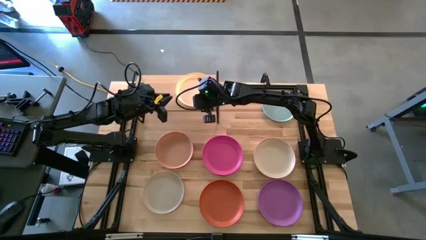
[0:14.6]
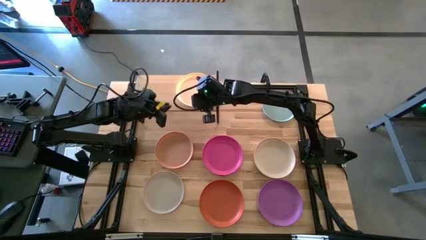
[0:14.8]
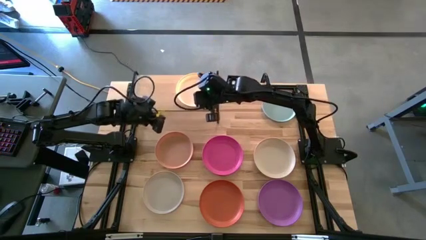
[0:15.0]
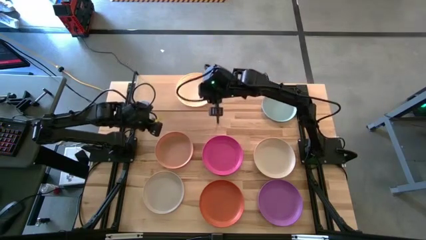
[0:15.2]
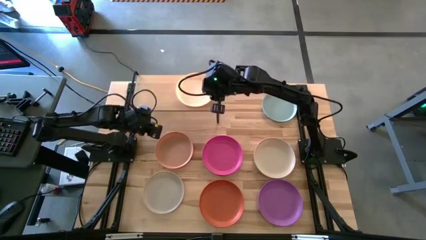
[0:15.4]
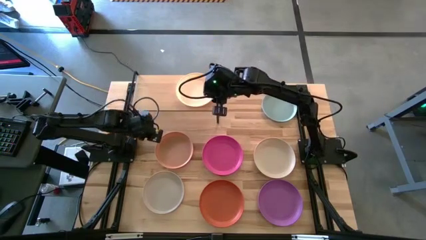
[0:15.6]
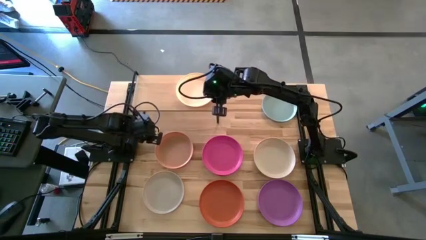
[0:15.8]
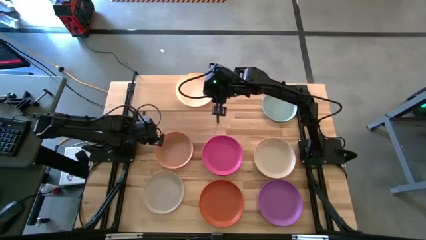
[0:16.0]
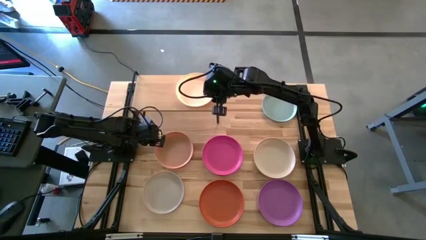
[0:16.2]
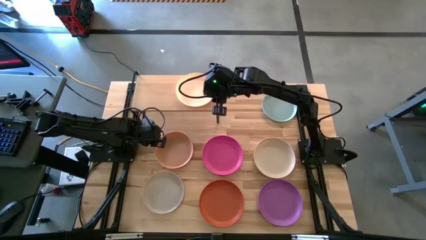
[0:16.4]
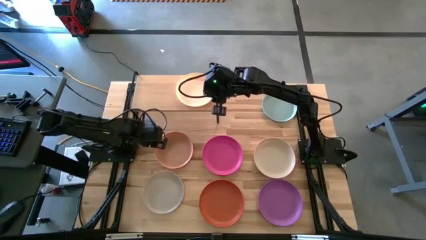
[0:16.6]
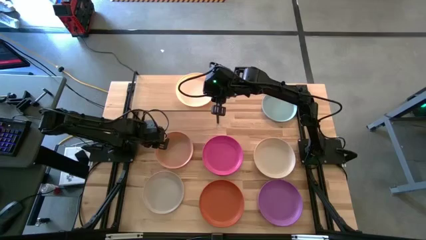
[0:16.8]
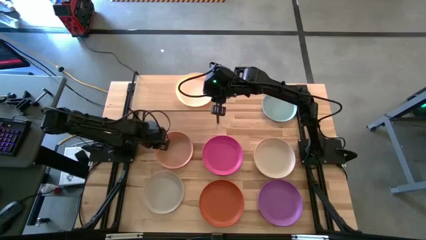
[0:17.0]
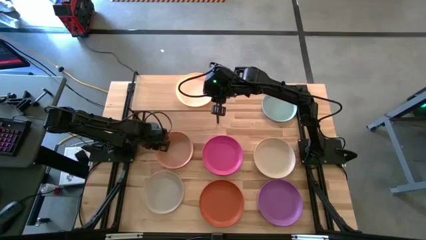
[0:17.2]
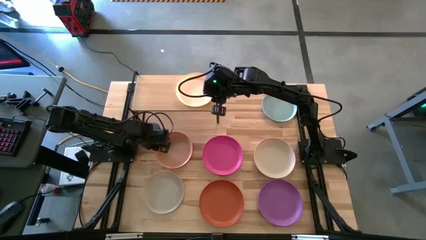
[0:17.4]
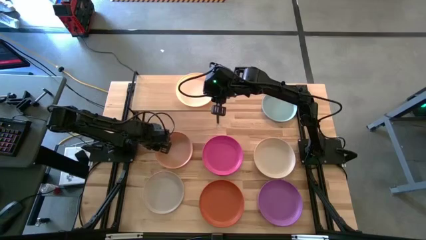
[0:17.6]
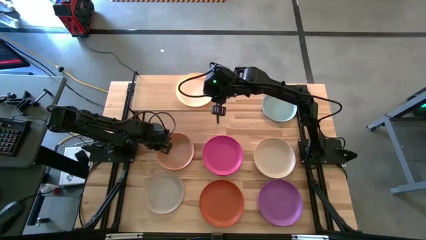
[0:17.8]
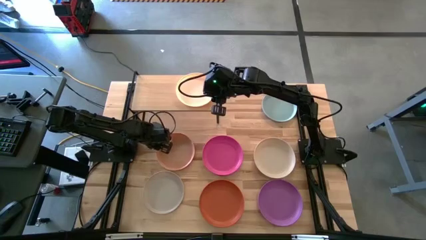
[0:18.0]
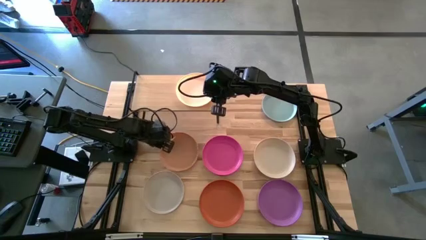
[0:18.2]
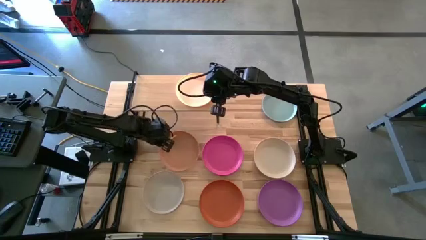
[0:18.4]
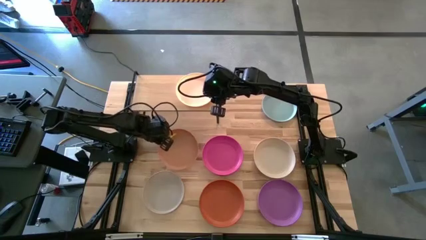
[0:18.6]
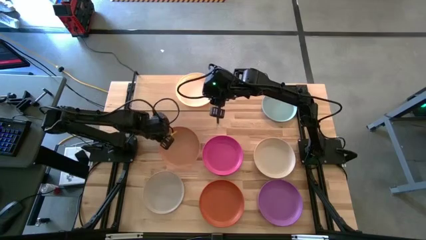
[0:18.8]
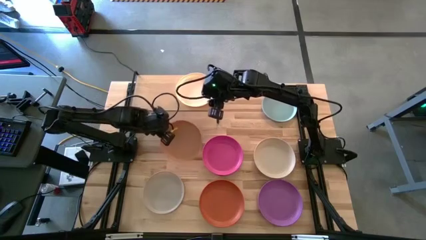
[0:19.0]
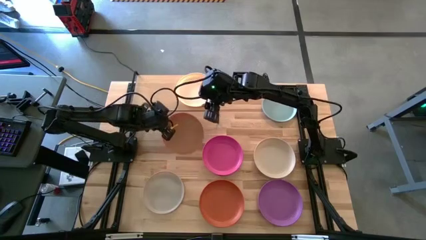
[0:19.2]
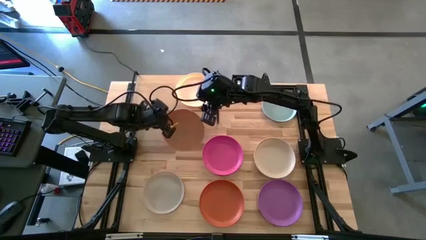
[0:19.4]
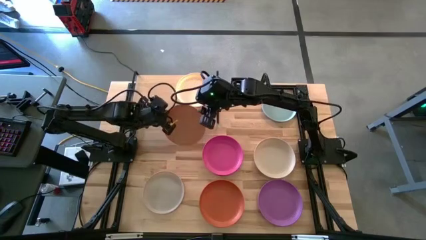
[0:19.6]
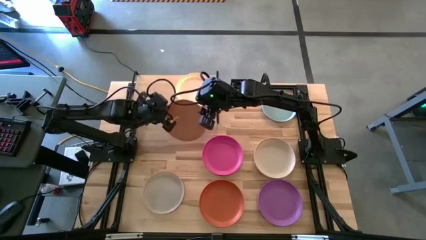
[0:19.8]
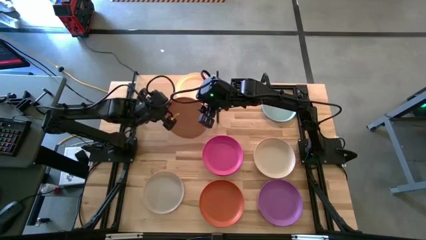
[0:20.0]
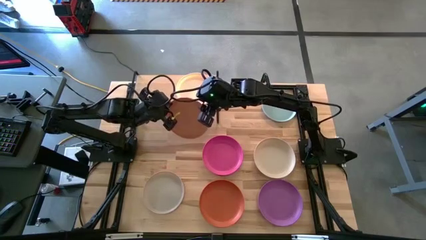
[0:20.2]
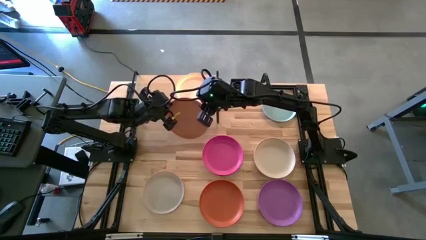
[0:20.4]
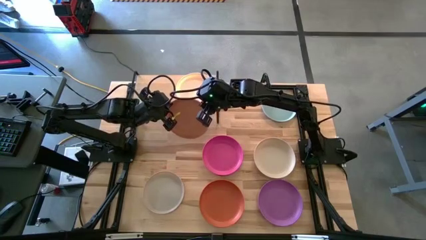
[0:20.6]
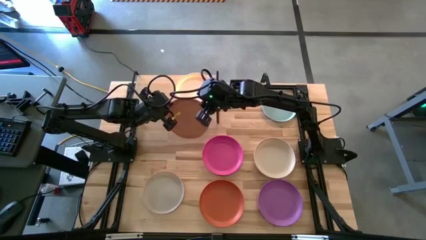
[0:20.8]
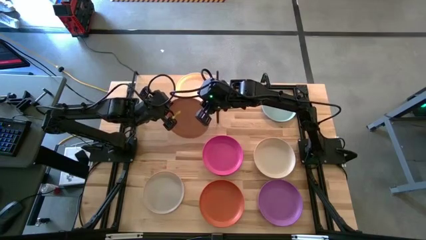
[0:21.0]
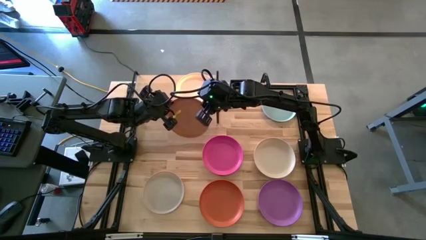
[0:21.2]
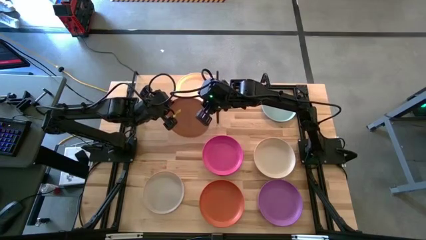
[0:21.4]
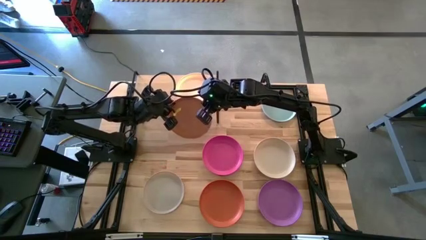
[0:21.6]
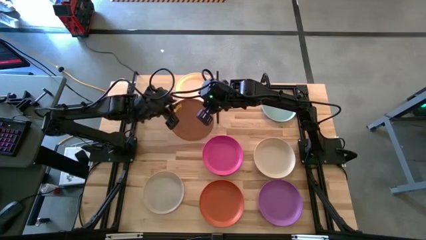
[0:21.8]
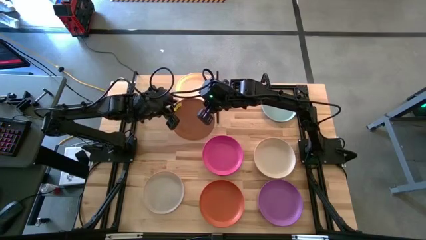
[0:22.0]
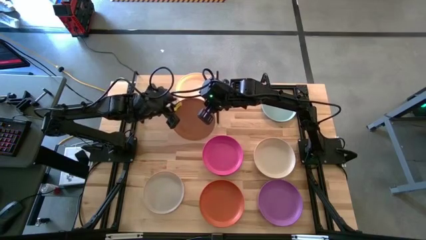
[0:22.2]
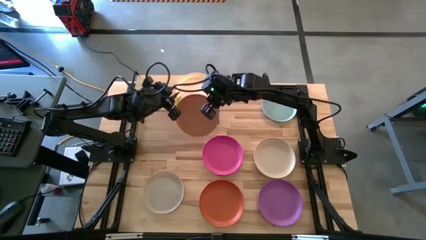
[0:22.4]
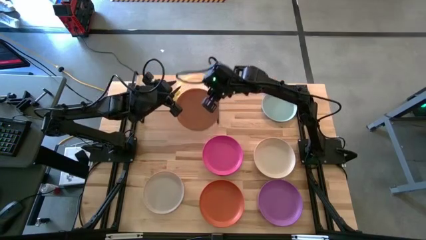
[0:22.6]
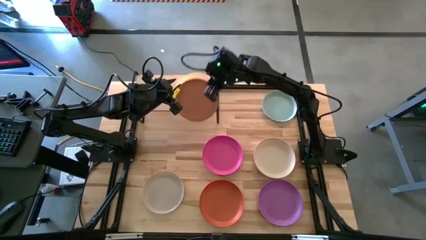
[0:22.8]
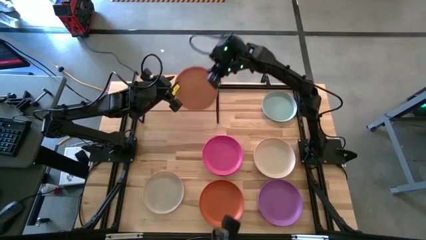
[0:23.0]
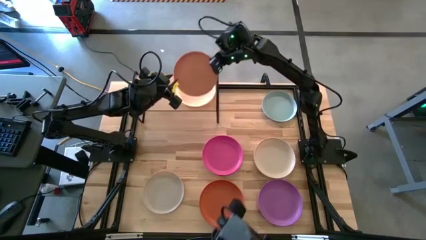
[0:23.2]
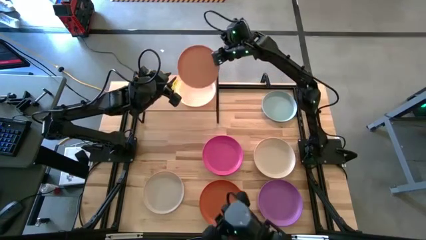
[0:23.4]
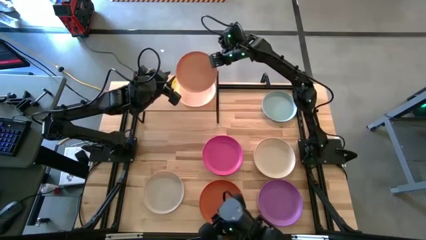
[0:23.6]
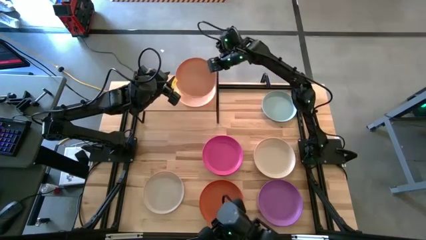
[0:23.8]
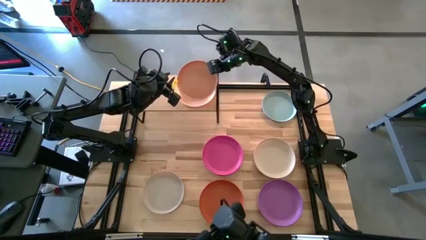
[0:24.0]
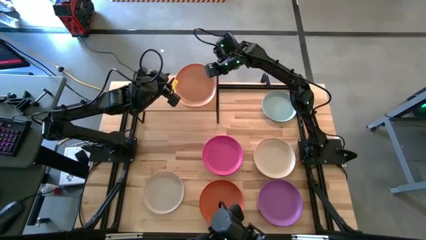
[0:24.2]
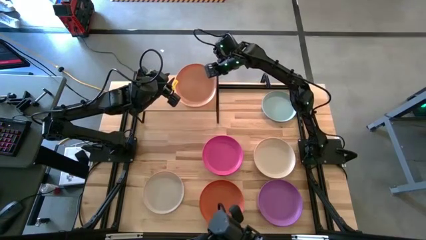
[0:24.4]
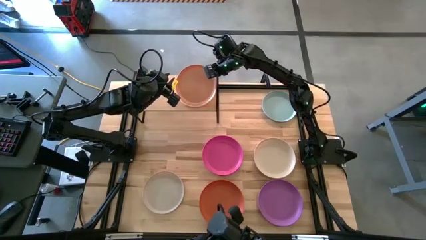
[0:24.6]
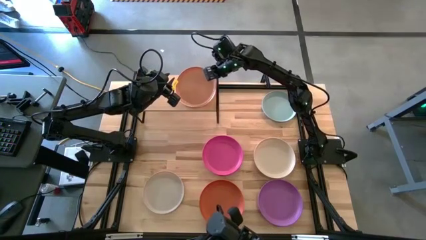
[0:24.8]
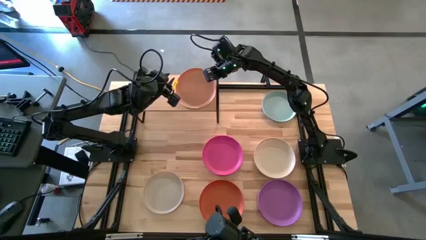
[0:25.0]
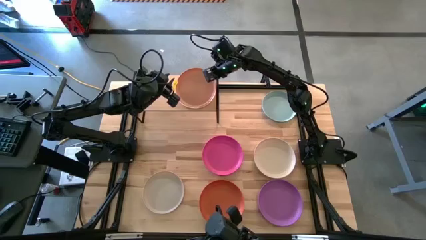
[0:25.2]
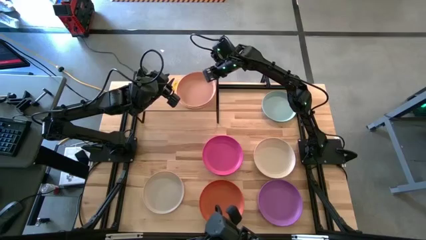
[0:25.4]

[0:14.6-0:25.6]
Task: Place and stack plates onto a shelf
Stack the brown plate on top of the light orange plate on the shelf

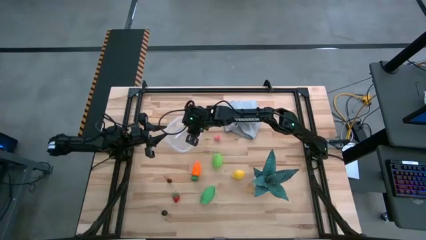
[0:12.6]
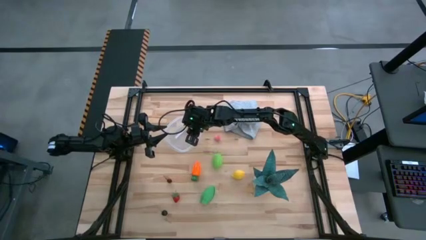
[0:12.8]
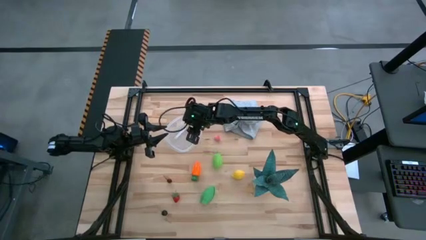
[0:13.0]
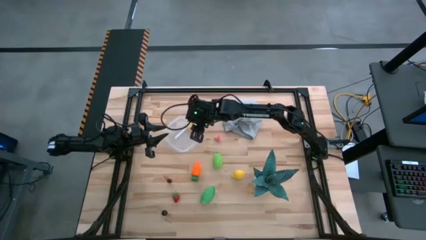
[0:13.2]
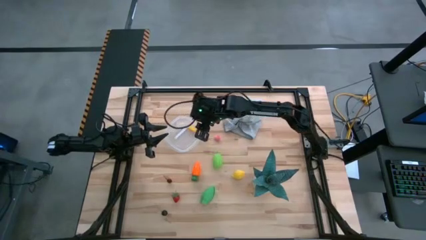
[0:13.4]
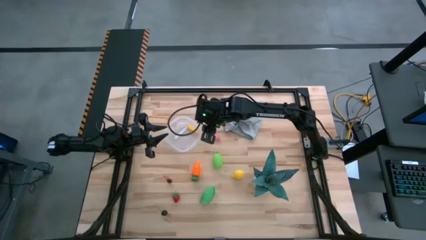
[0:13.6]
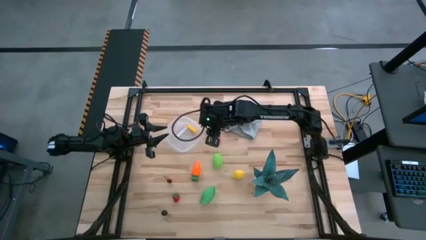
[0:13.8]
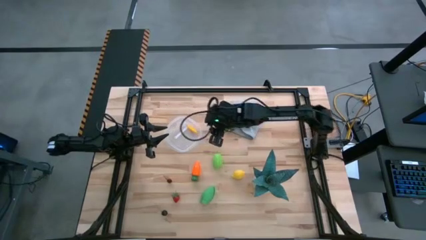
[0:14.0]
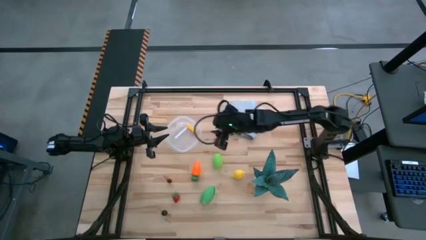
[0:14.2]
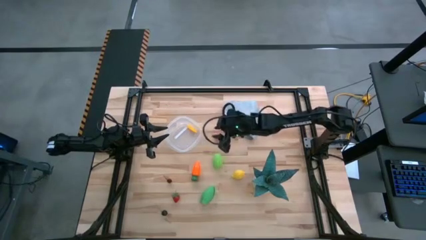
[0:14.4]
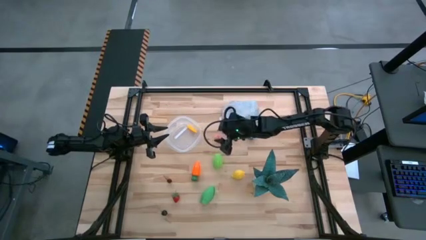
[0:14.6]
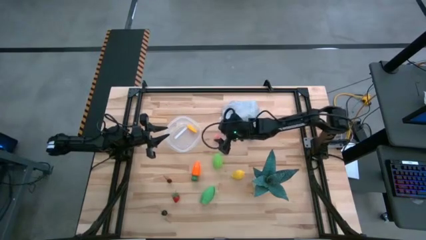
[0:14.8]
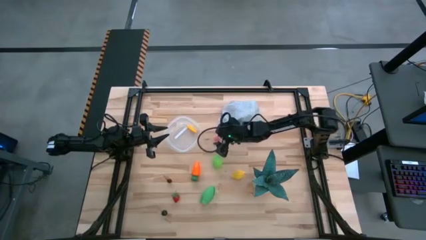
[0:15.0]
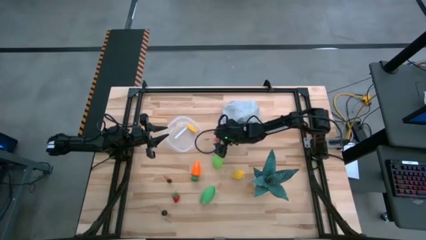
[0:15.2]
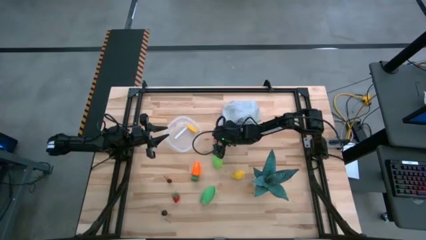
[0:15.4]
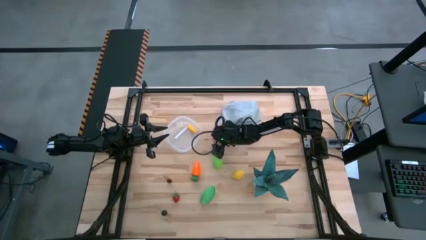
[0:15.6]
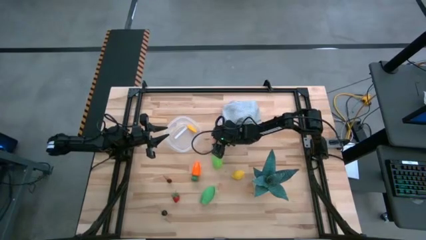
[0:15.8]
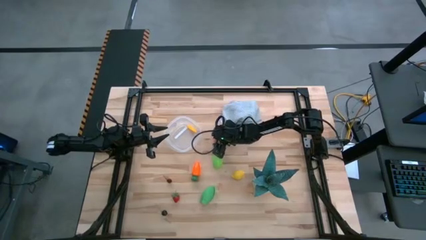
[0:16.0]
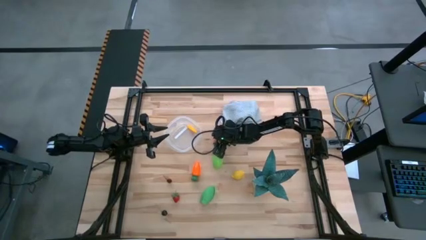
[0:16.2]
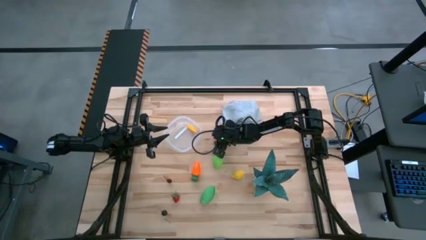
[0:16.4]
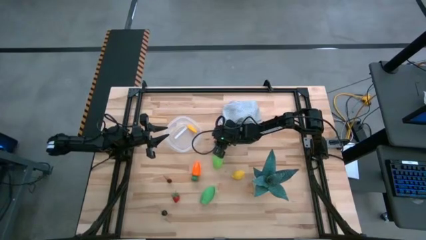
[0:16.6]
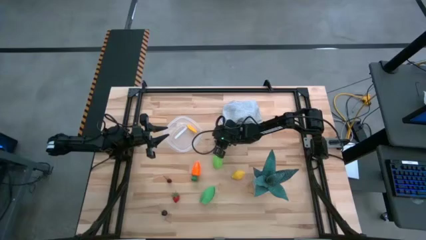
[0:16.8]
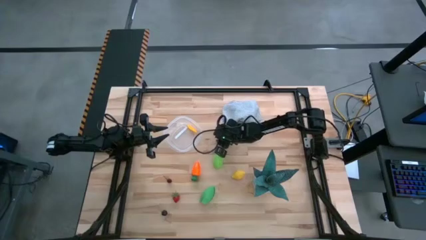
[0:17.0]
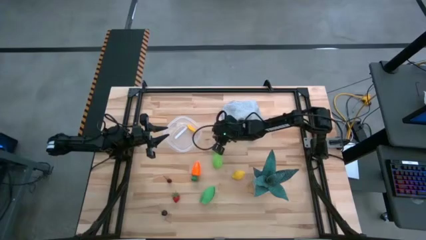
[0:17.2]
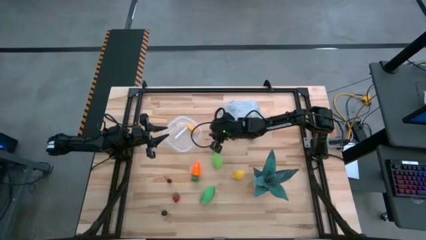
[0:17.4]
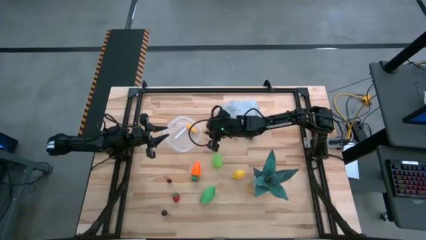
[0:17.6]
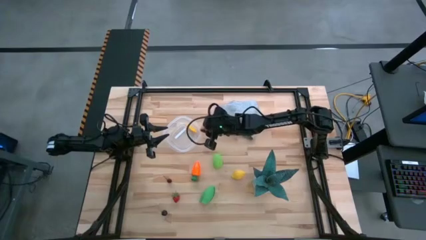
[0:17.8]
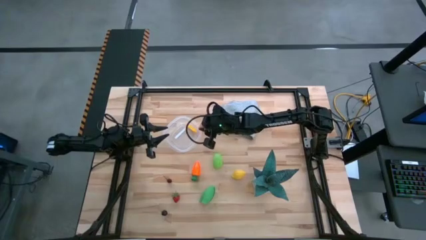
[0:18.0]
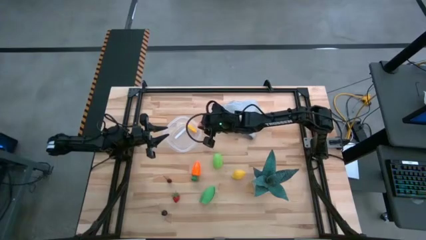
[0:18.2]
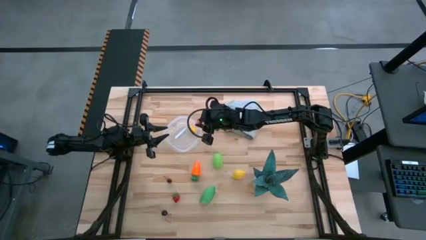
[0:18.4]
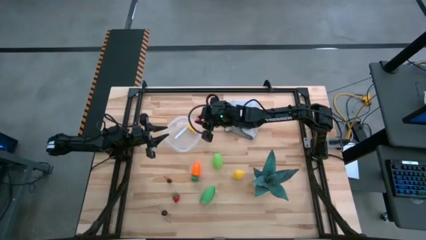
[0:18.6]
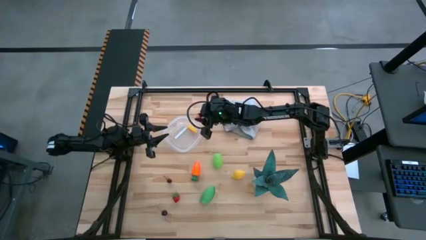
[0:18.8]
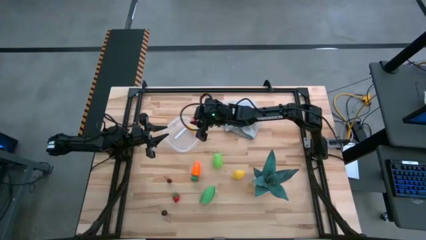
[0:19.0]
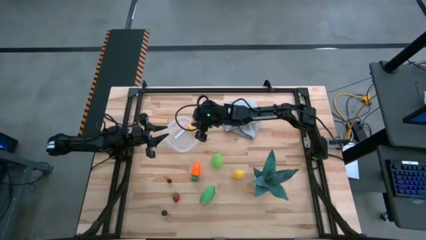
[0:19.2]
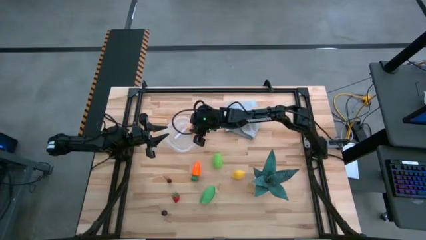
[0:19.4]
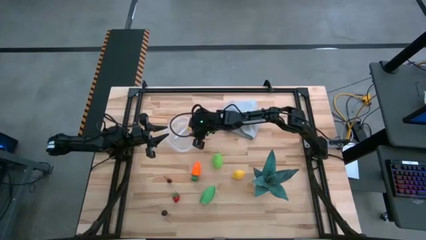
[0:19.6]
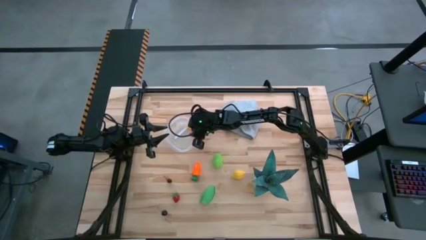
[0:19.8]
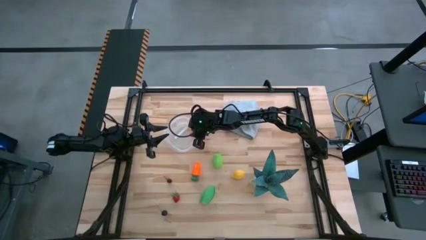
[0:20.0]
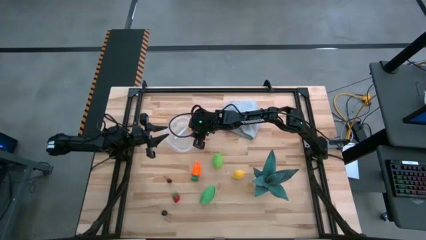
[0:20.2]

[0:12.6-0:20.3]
Task: Pick and placing Produce into tupperware
Put the pink peach into the transparent container
